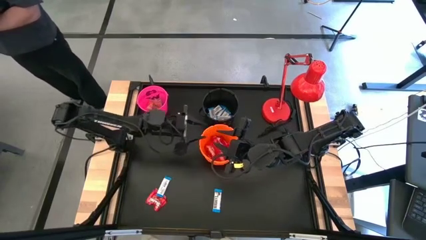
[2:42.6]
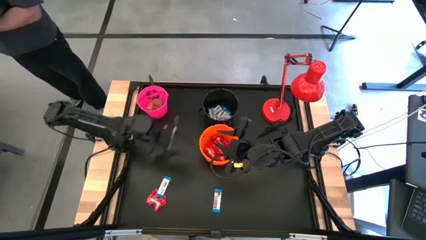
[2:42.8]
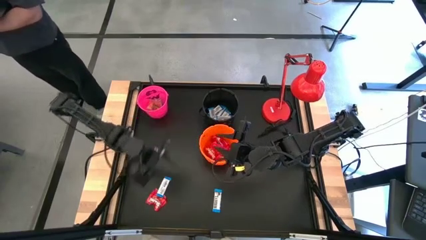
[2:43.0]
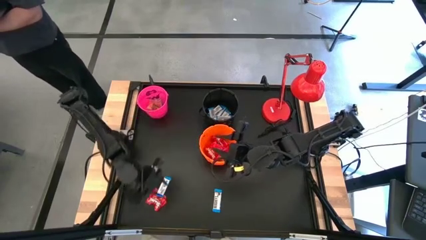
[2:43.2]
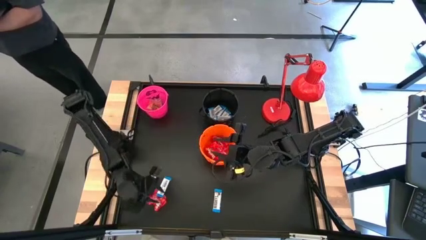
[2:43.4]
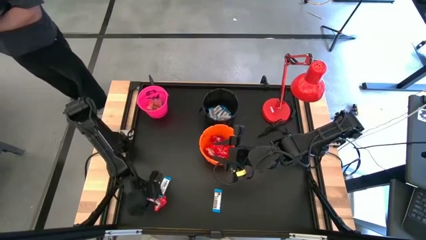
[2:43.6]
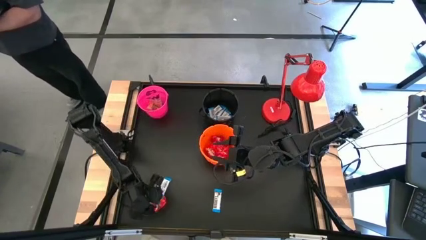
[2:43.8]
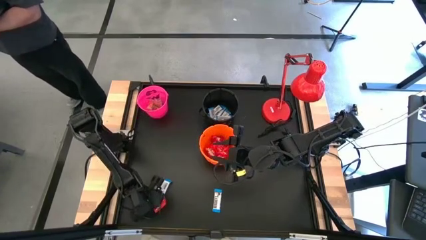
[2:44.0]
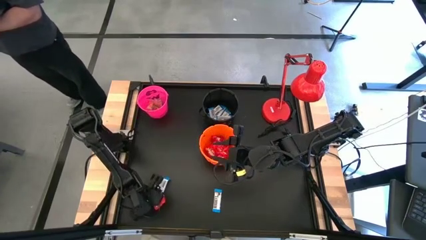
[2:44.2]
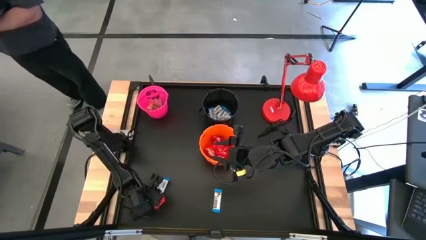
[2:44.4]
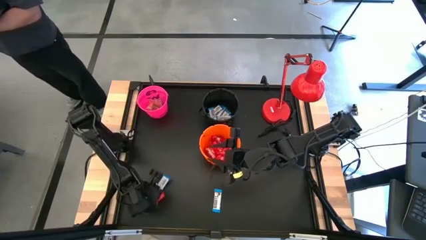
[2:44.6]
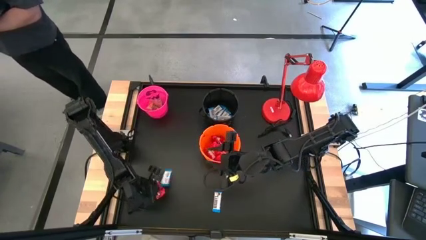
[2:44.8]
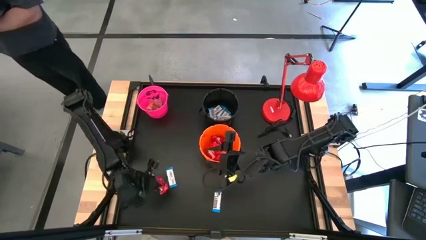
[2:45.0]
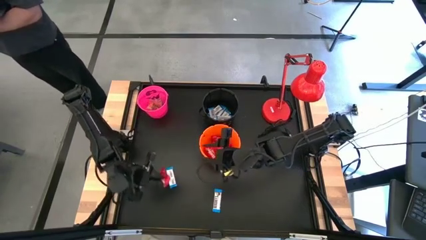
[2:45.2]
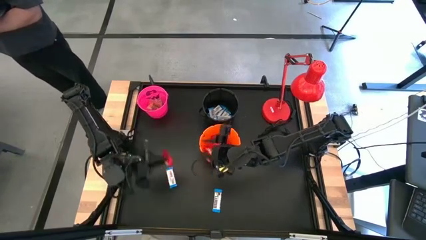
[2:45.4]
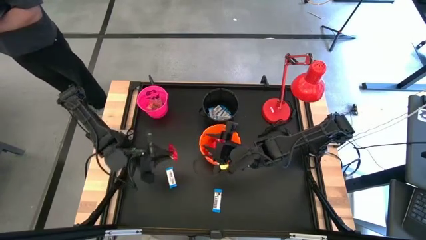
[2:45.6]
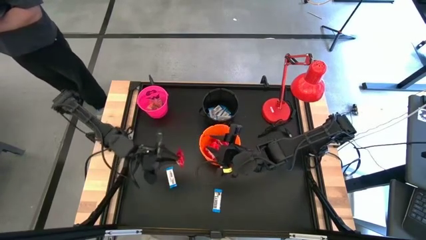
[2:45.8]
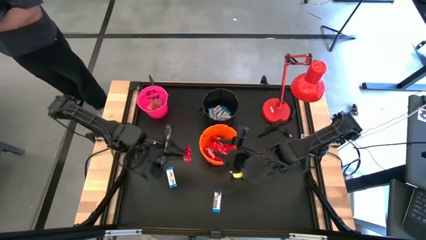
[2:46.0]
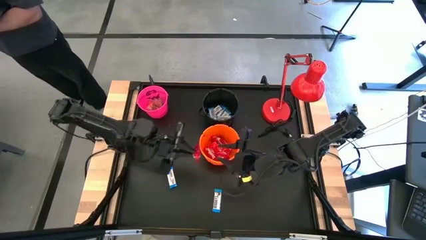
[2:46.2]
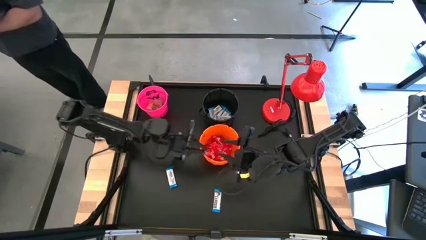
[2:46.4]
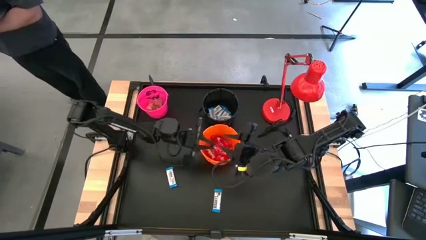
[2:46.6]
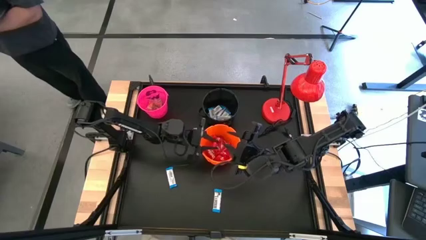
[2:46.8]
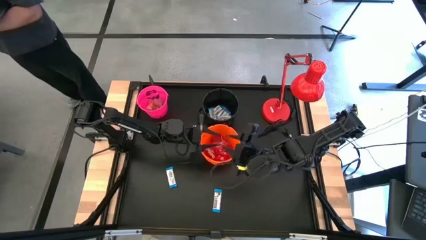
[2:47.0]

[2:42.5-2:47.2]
Task: Sort candy
Put the red candy into the orange bucket

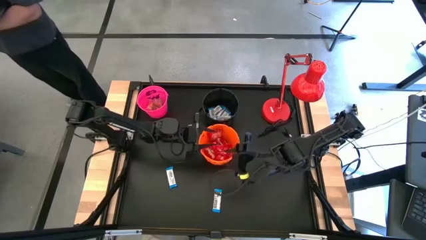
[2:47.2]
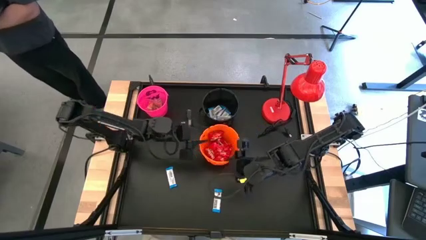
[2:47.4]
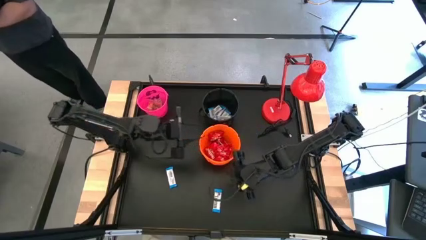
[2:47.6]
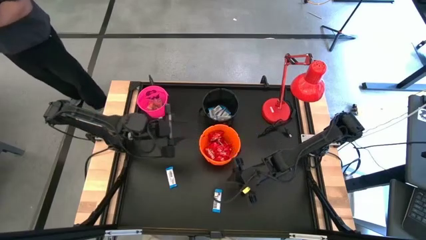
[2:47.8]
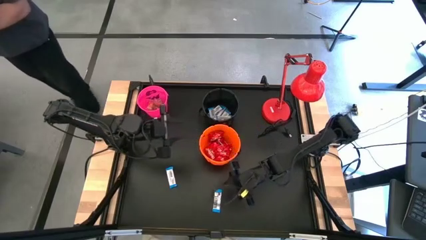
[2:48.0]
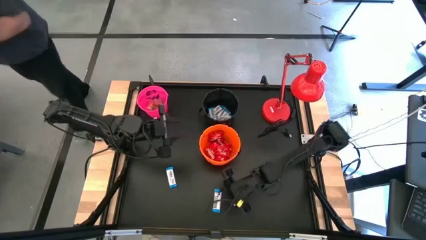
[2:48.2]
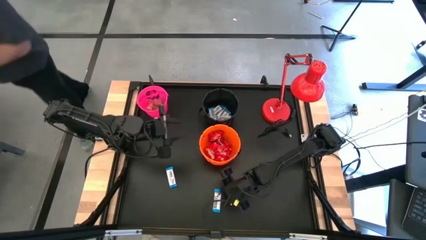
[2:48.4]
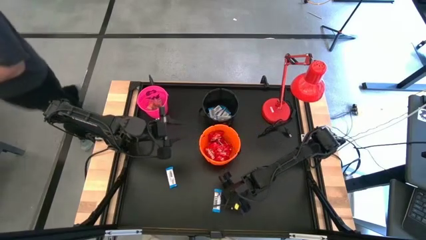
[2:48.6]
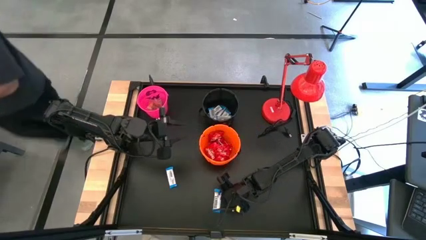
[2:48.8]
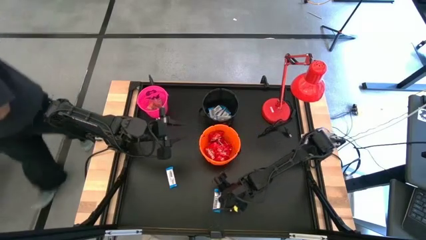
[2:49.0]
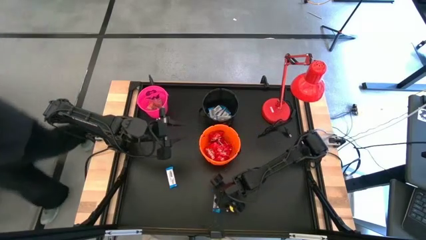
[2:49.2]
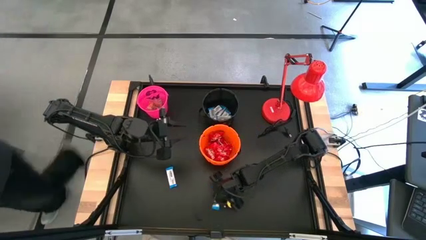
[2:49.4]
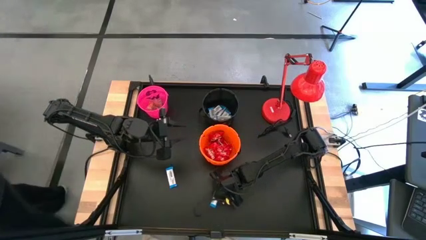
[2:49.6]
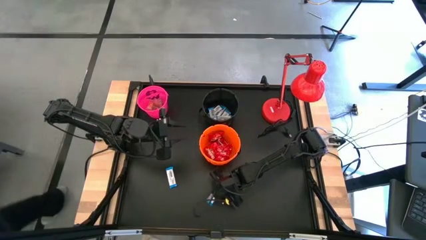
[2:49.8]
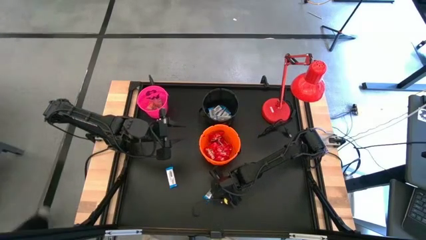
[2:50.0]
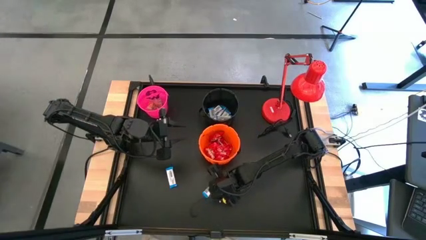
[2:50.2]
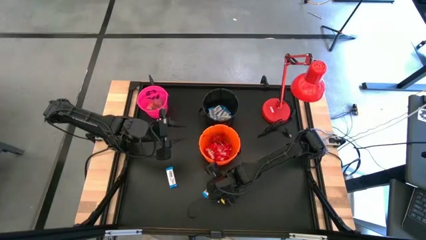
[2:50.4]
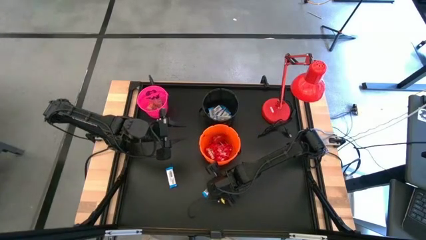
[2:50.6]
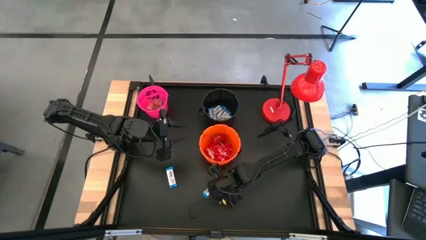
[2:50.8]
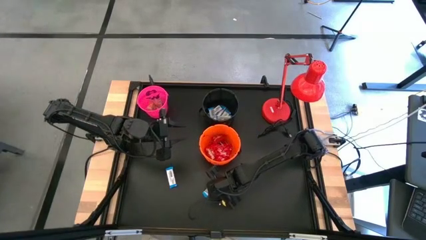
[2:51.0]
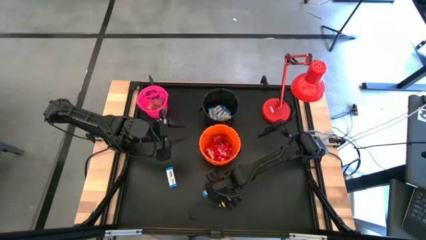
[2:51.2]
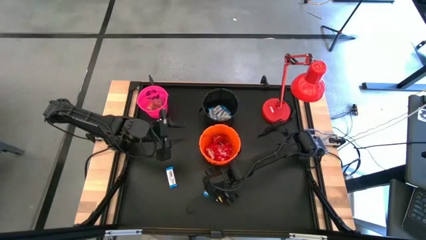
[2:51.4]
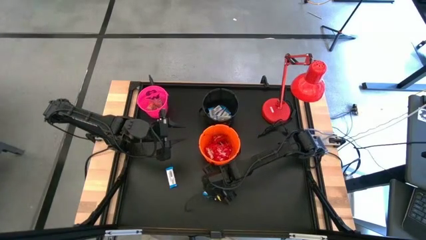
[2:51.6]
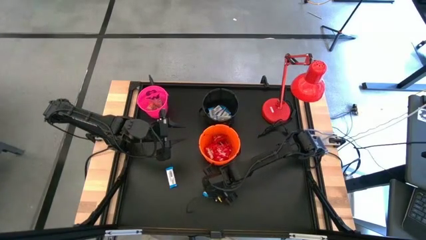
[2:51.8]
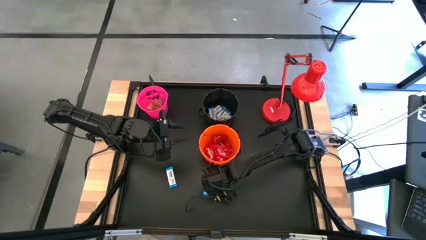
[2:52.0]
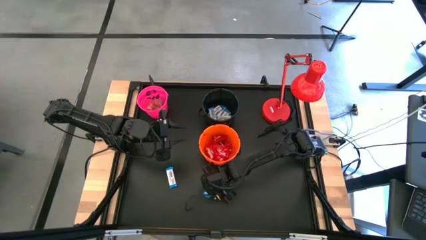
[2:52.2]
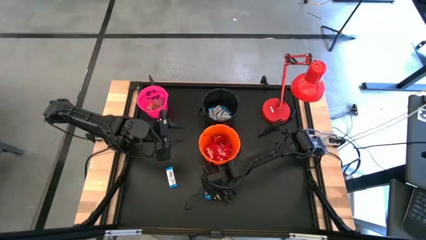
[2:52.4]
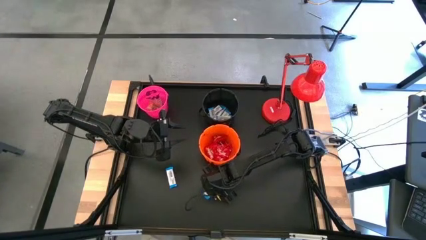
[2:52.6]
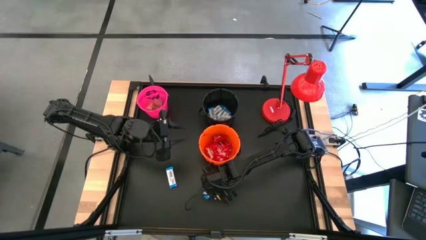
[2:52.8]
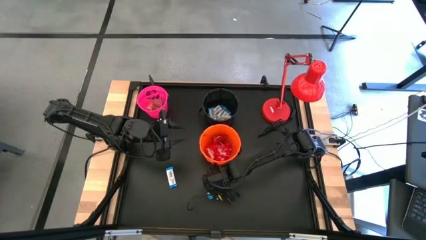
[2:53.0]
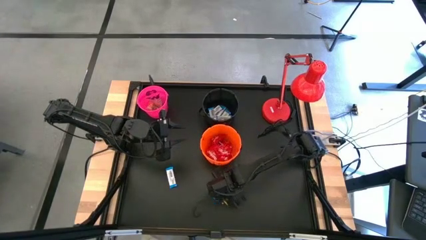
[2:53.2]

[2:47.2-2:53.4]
Put the white chocolate into the black bucket

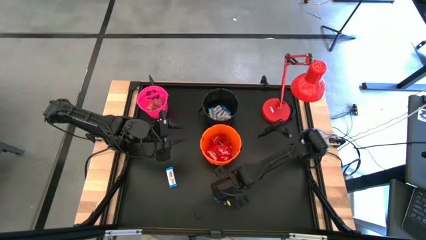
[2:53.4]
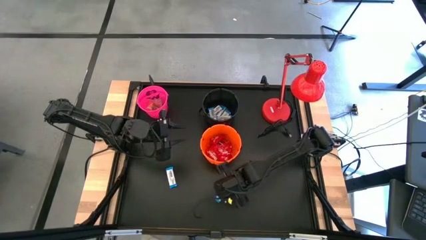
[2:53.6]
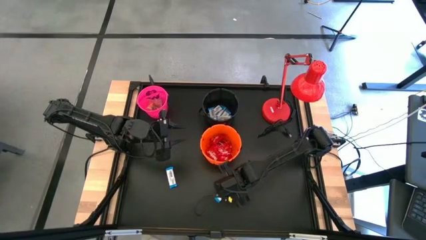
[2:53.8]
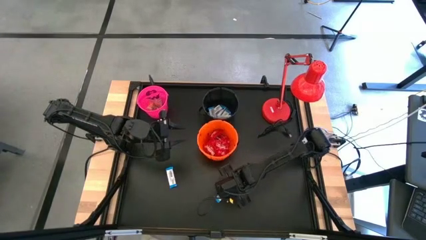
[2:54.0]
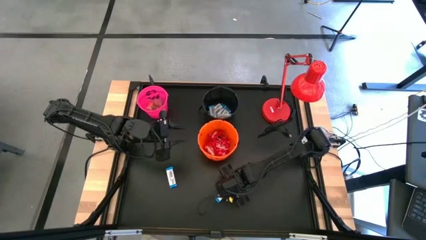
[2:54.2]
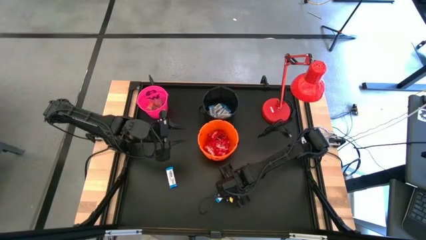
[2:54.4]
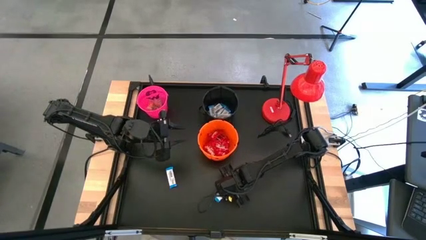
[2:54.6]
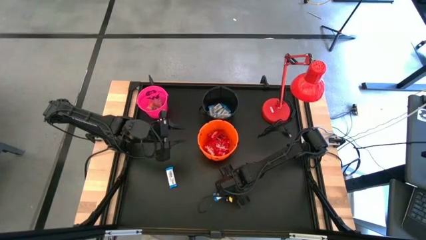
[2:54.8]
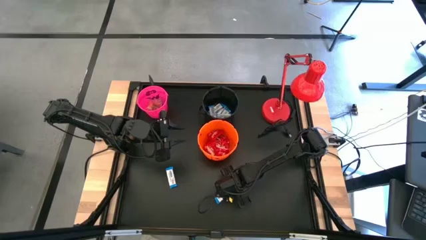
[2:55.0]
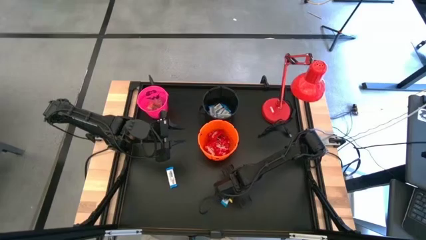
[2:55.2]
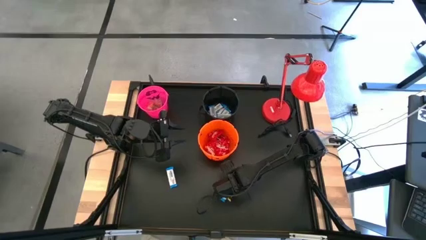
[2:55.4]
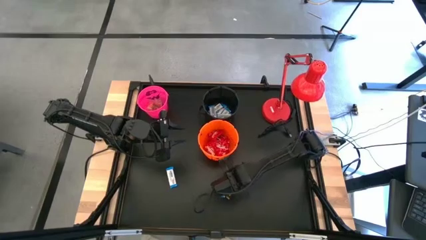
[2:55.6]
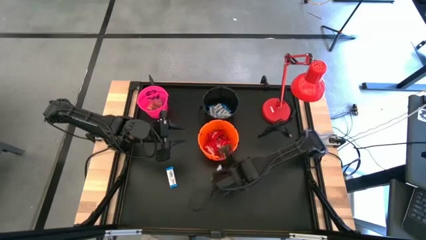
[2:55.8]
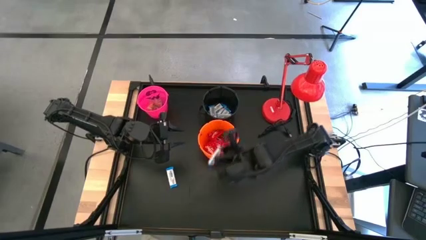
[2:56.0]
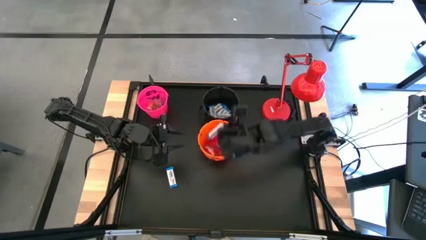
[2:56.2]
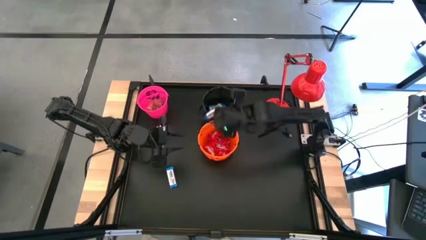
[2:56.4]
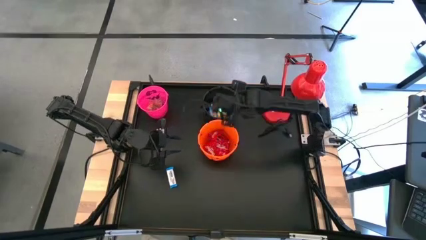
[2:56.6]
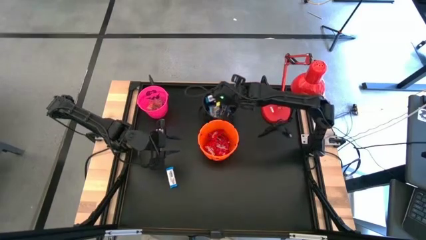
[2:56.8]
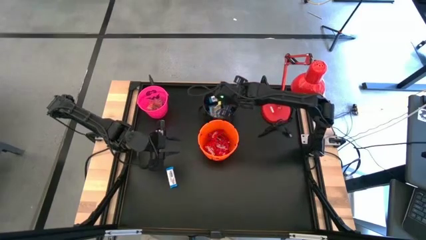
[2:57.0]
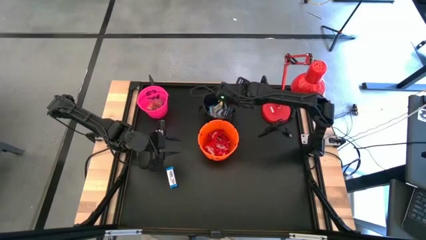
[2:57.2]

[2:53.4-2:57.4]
Put the white chocolate into the black bucket

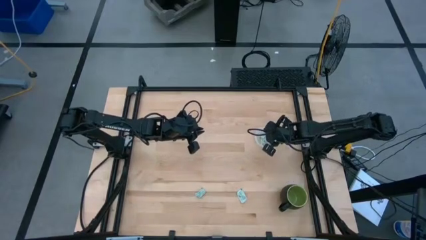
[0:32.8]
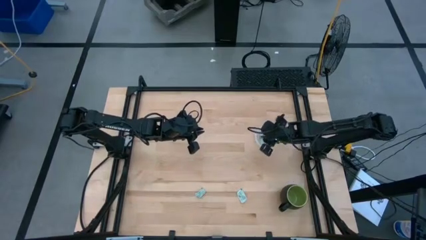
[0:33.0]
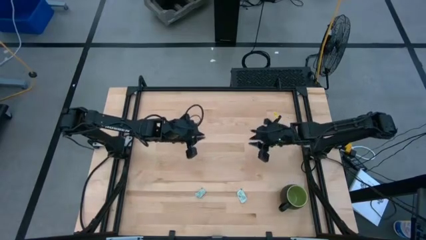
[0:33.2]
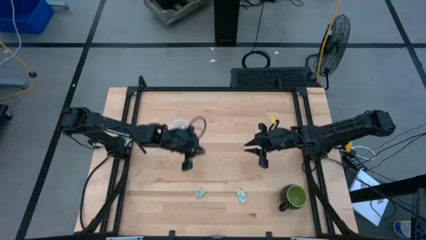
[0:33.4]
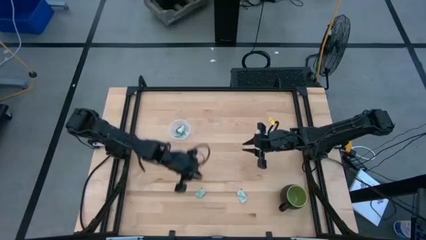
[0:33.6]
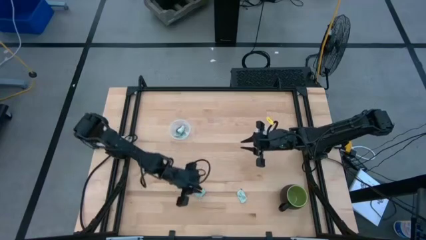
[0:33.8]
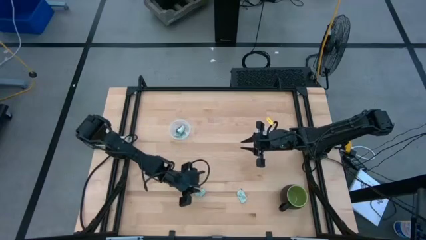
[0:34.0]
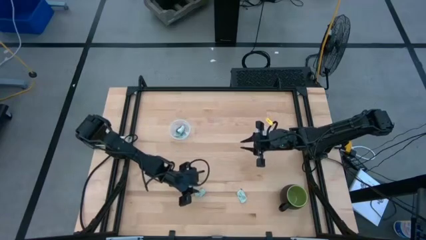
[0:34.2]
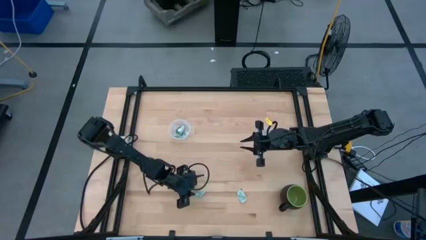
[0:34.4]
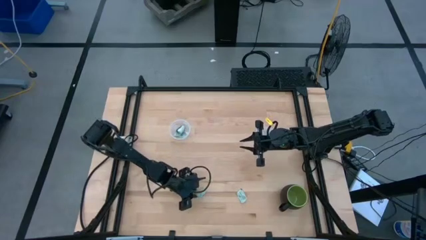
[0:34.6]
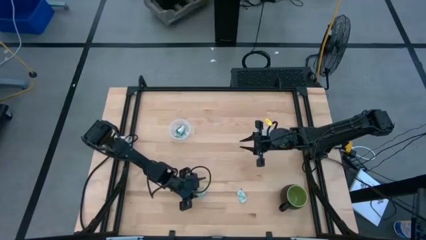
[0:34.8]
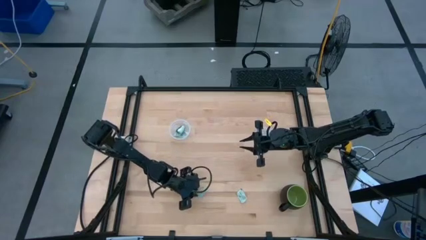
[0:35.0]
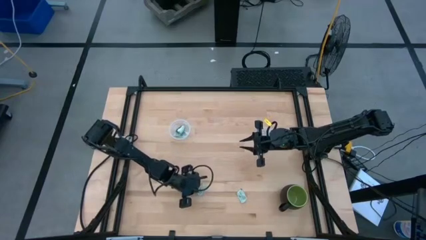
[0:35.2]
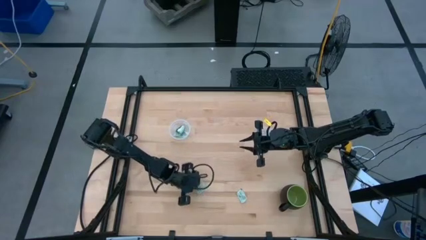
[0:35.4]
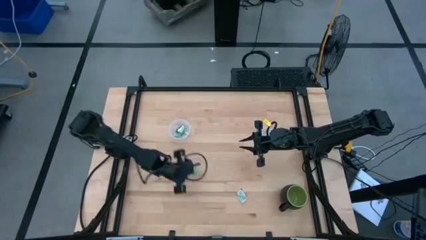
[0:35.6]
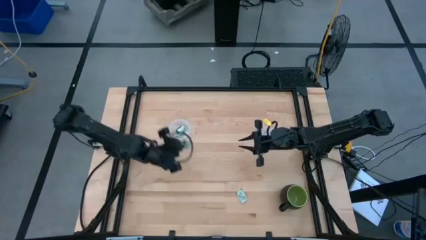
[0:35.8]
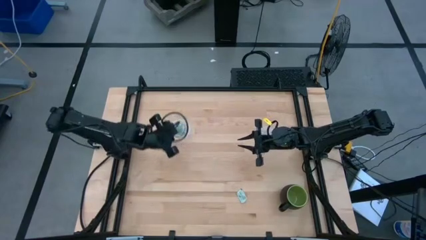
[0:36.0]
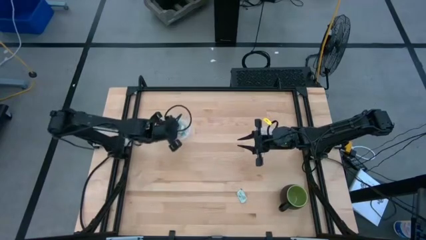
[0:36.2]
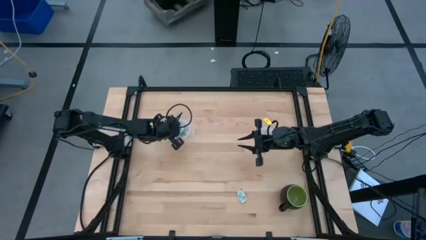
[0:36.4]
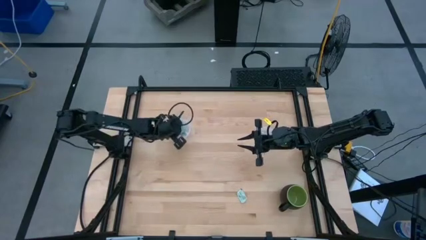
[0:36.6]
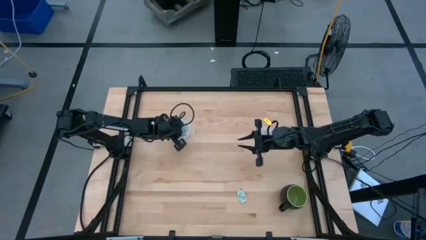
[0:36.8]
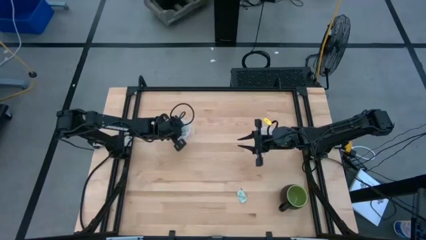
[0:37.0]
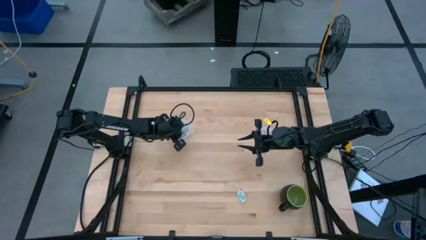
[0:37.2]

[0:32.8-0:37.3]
Task: Pick and place Stevia / Truvia into bins
Put the stevia packet into the left transparent container
